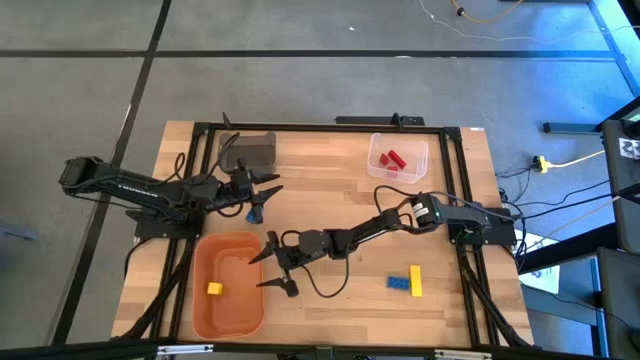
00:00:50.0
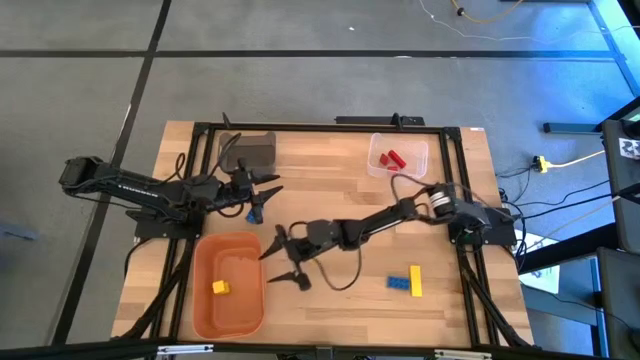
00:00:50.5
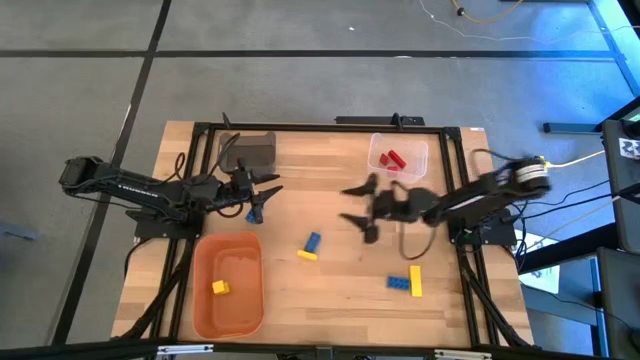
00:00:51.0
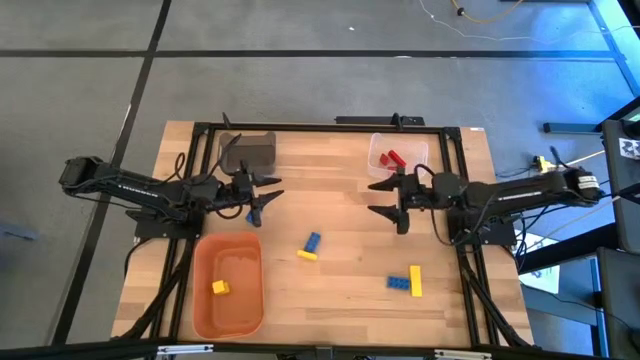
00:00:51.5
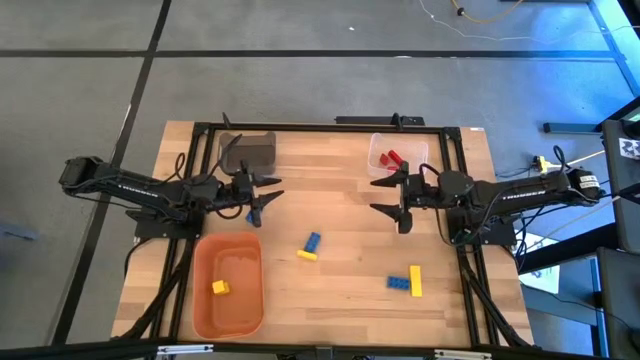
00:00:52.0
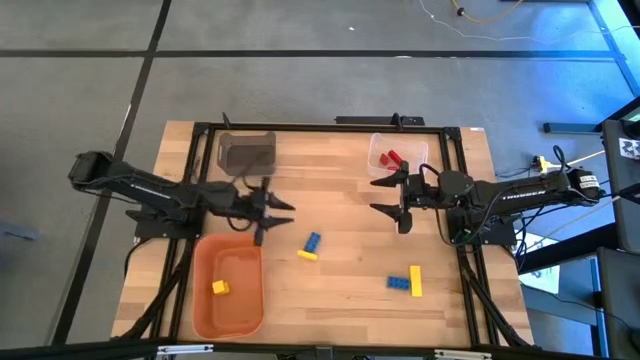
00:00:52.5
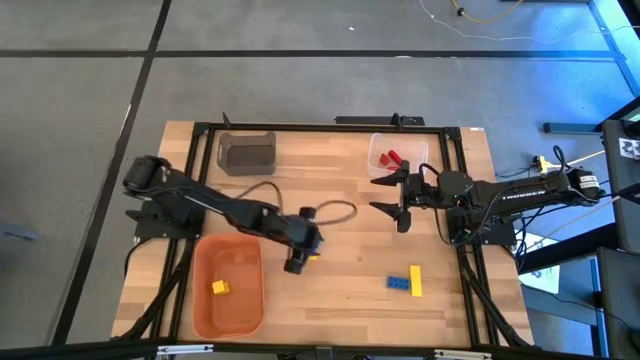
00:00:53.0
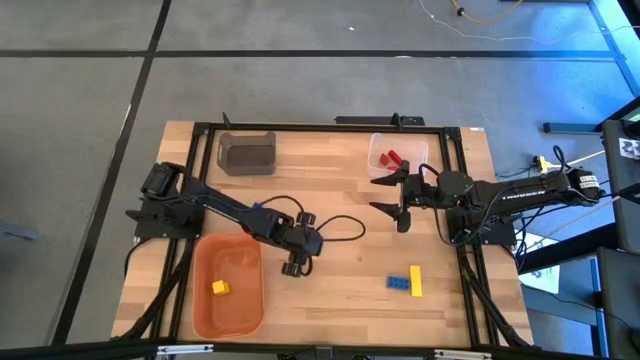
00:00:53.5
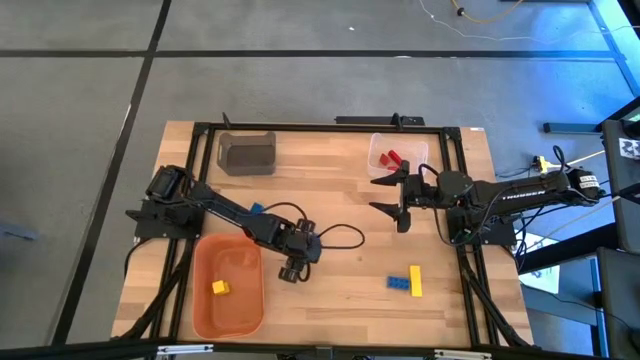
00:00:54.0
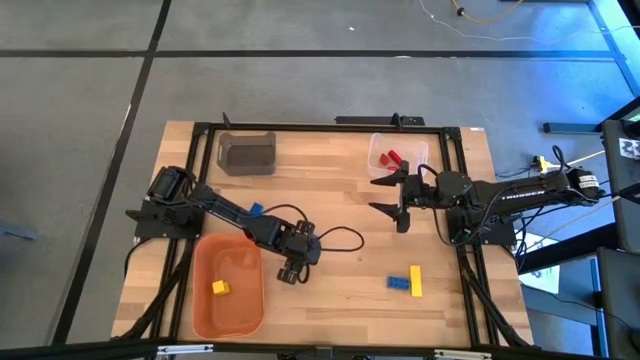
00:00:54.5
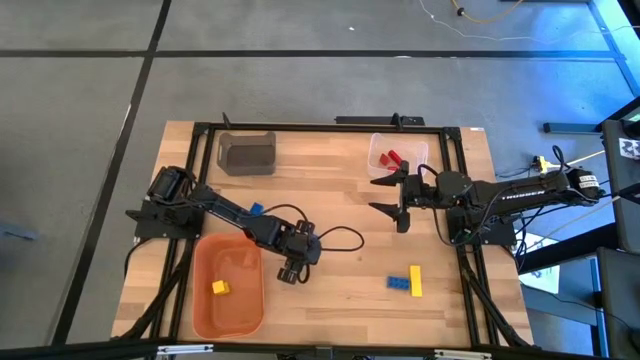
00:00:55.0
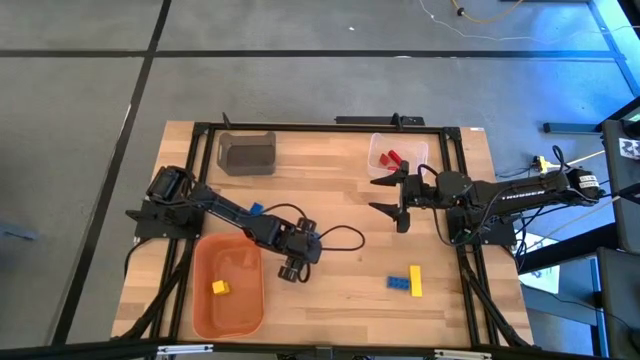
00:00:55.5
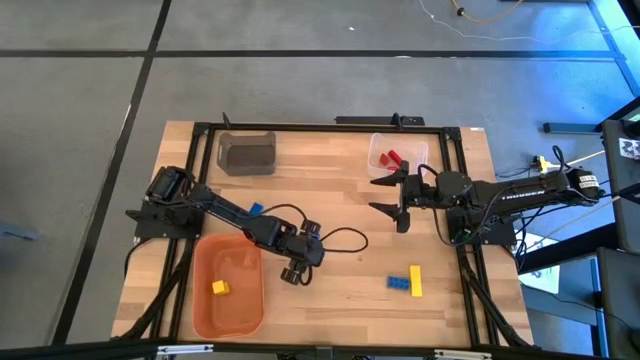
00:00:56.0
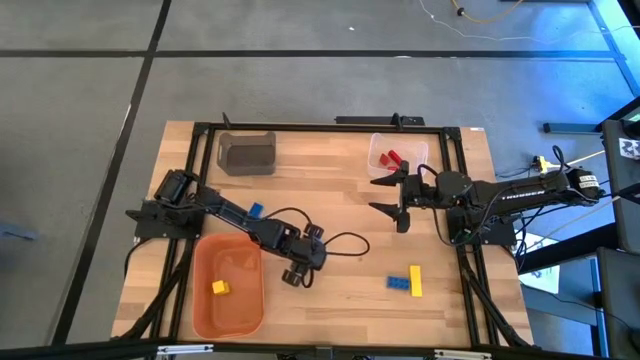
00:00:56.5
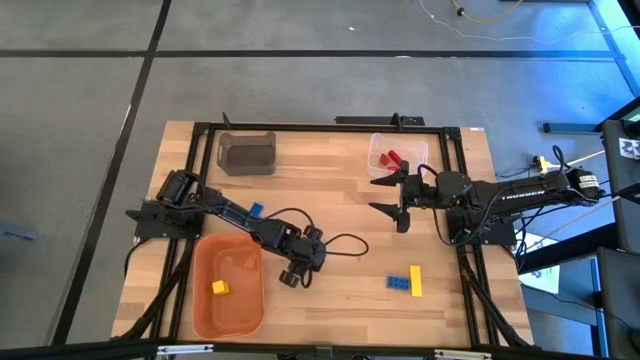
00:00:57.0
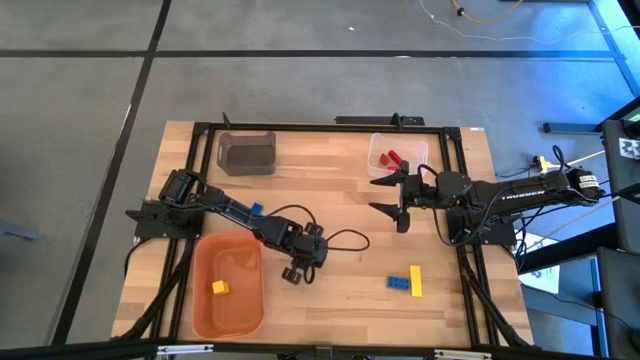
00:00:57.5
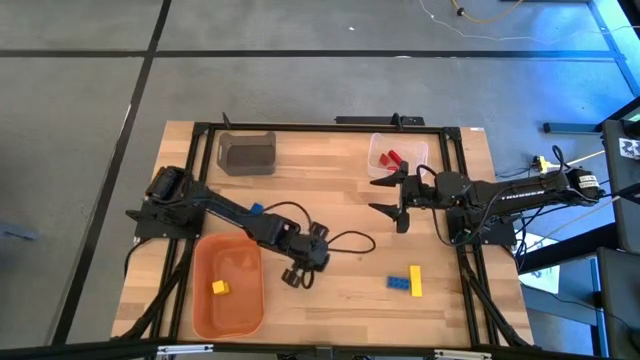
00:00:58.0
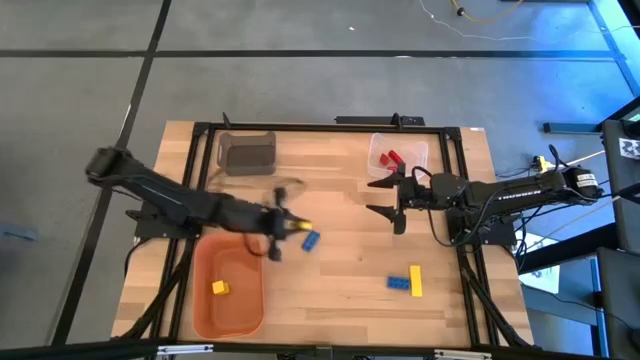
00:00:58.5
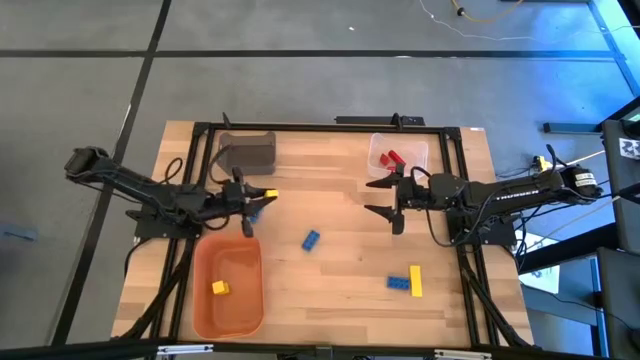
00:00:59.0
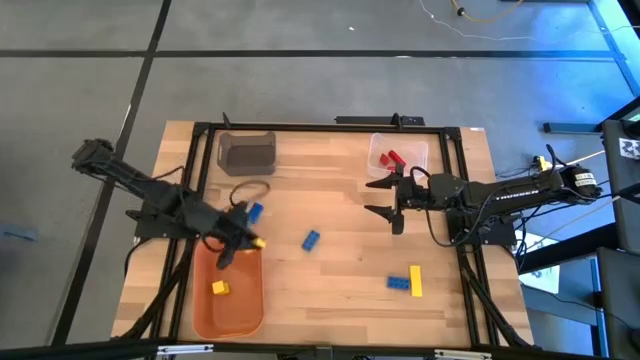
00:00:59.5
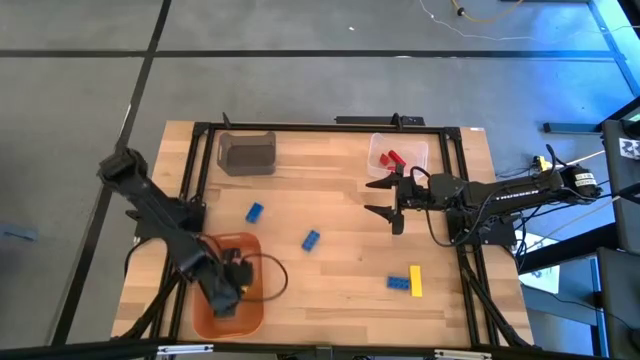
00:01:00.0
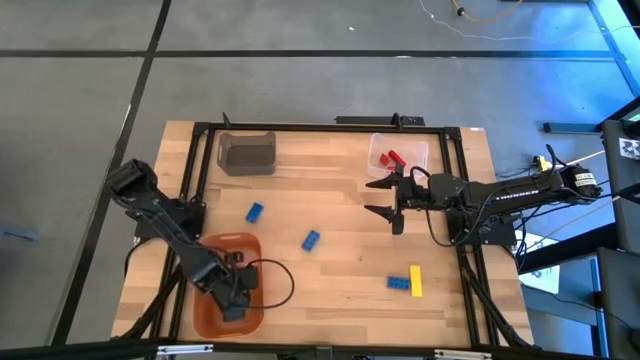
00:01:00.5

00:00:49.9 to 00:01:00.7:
Task: Sort & place blocks by color
Put the left yellow block into the orange bin

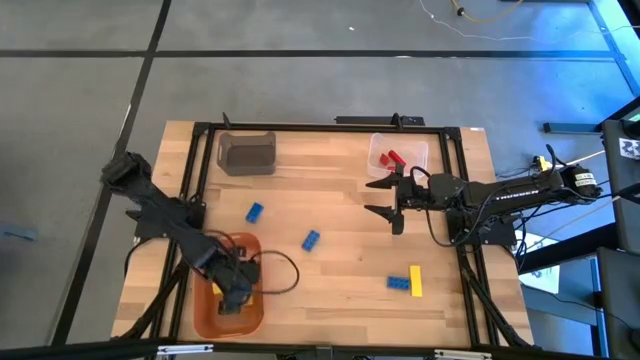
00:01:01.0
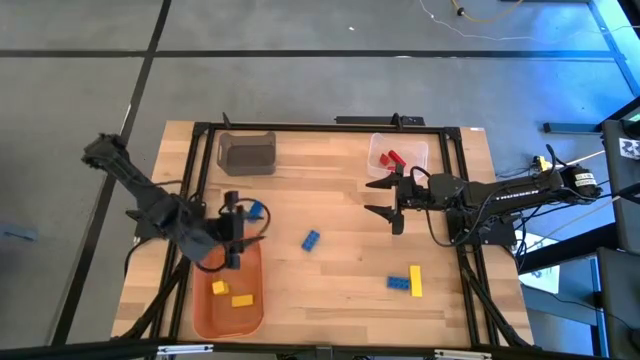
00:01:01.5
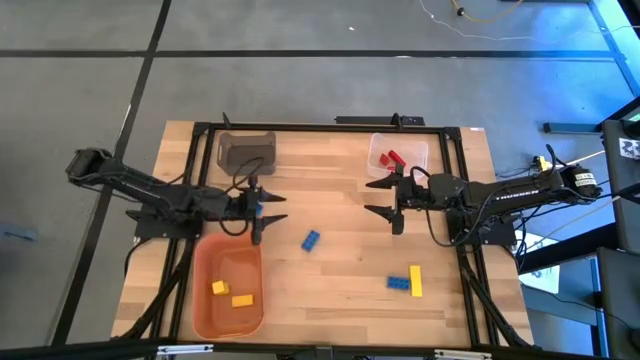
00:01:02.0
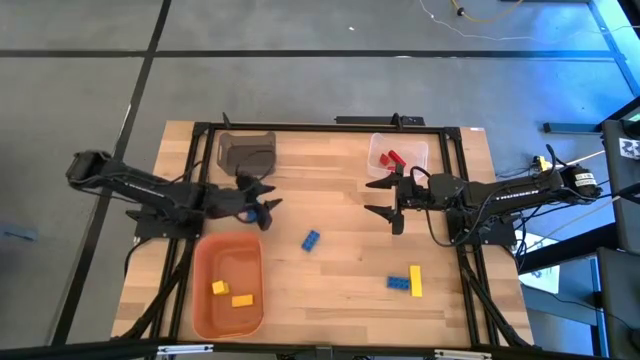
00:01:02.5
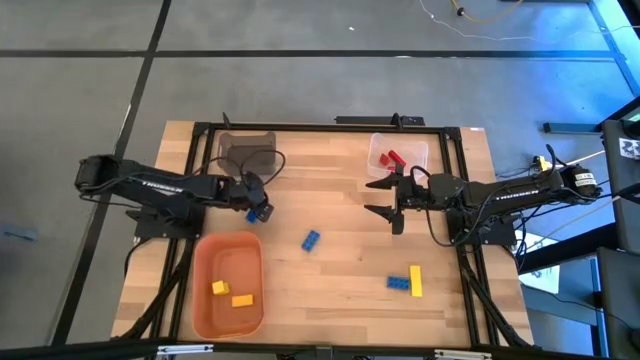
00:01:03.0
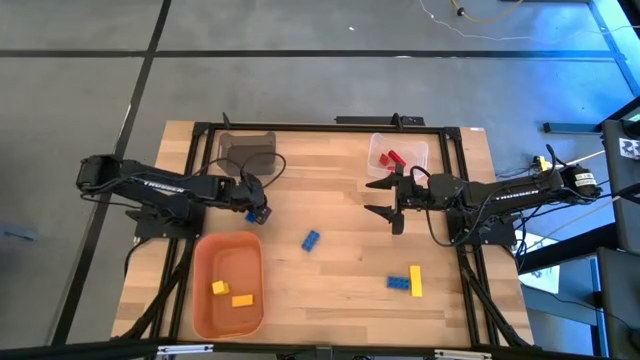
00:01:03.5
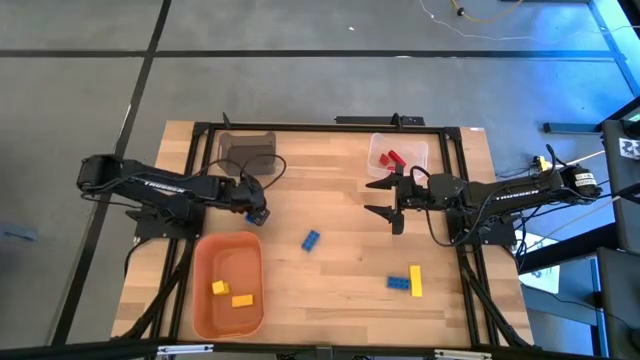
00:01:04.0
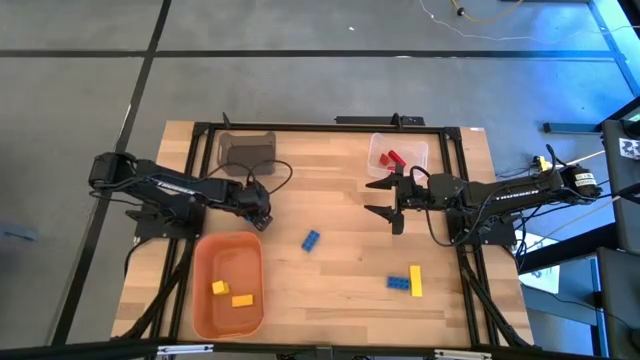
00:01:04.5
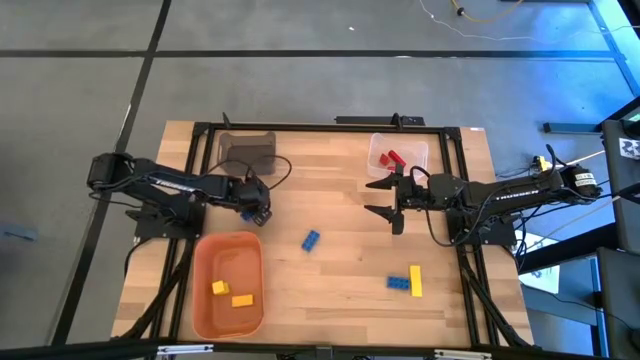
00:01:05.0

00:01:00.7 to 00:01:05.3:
Put the top left blue gamepiece into the black bin

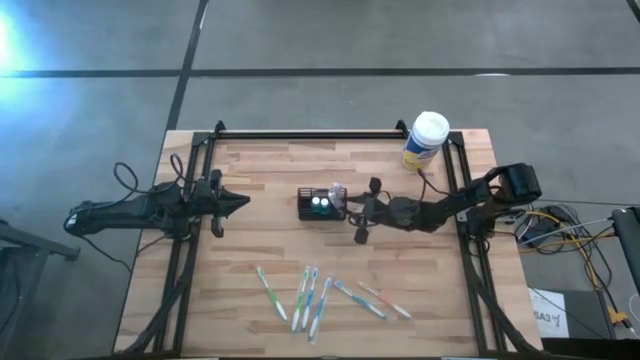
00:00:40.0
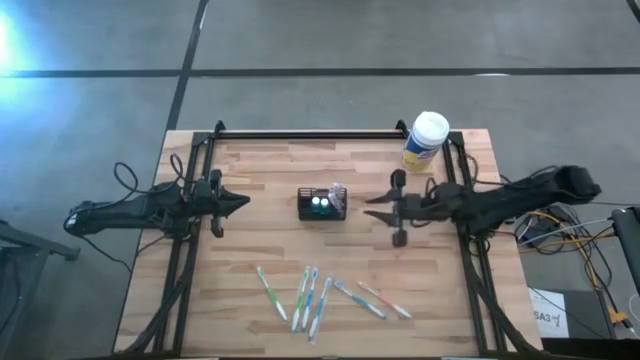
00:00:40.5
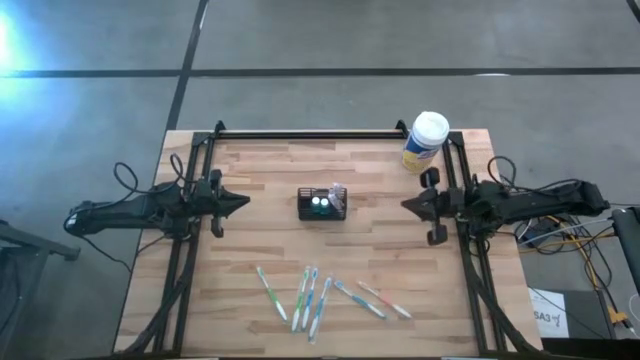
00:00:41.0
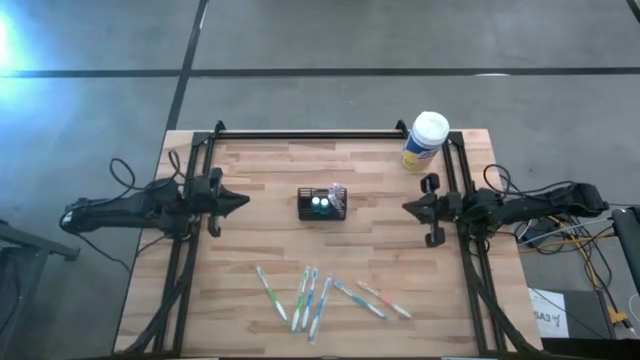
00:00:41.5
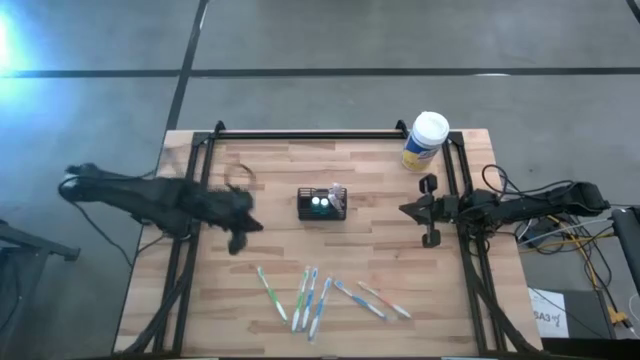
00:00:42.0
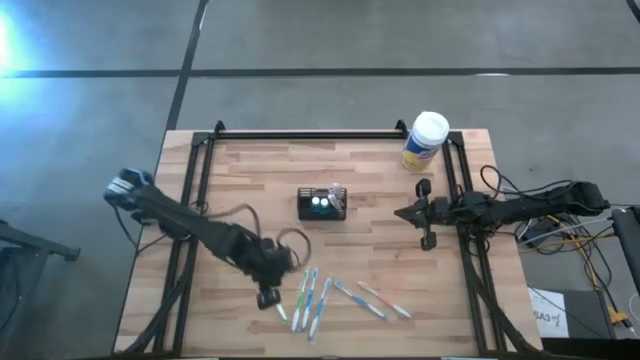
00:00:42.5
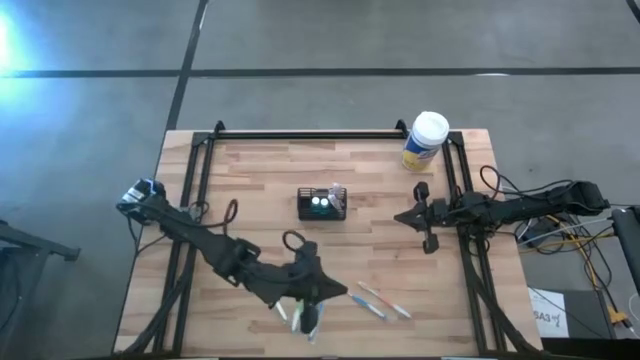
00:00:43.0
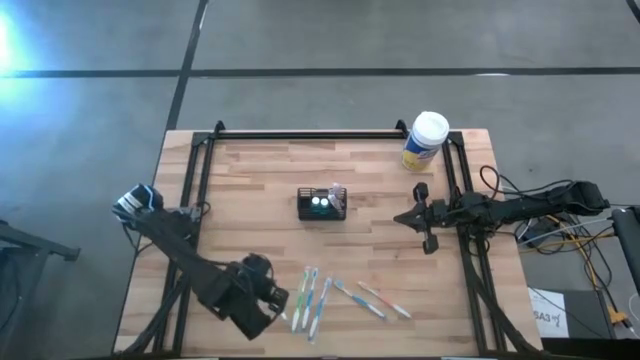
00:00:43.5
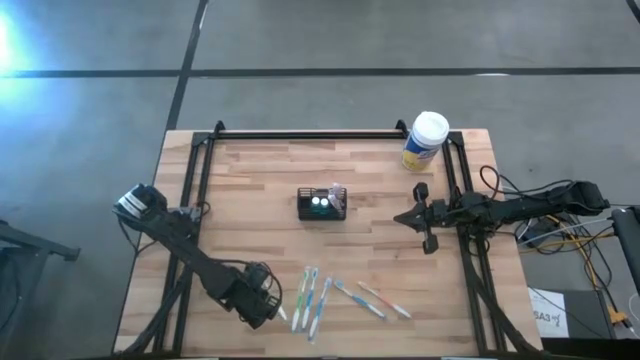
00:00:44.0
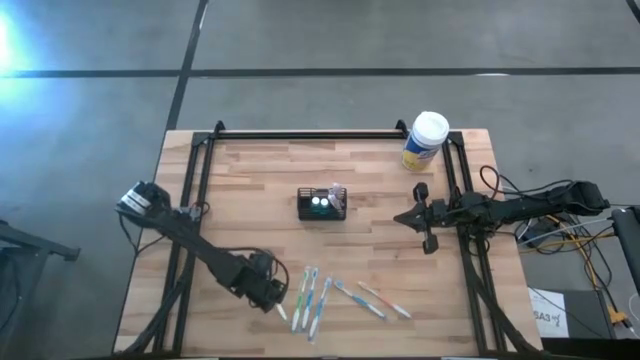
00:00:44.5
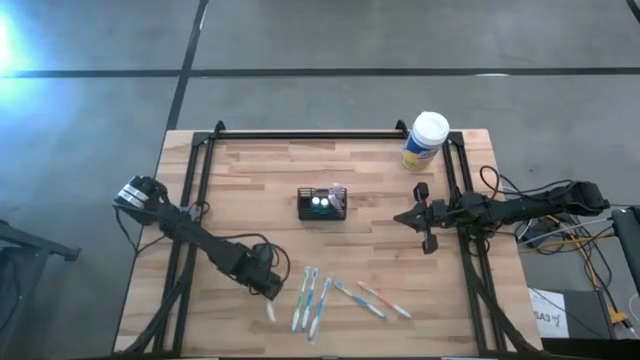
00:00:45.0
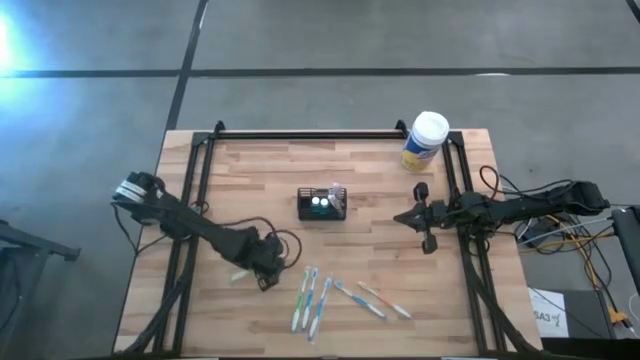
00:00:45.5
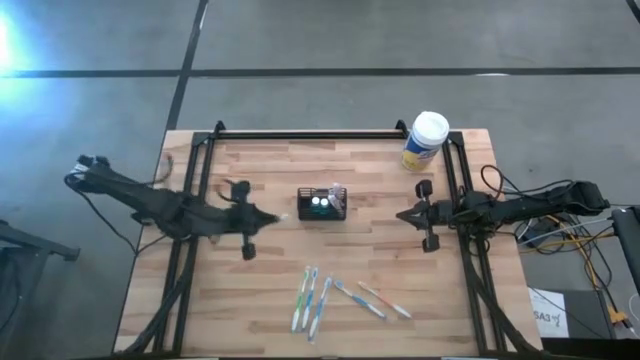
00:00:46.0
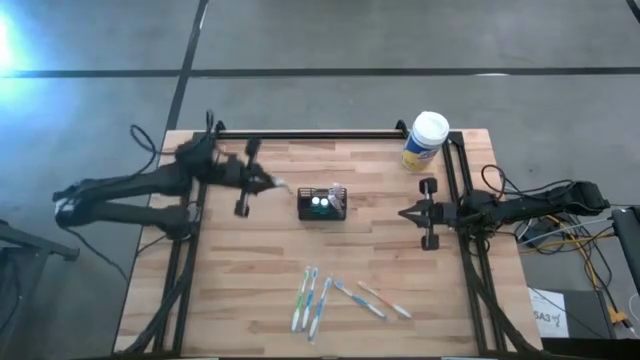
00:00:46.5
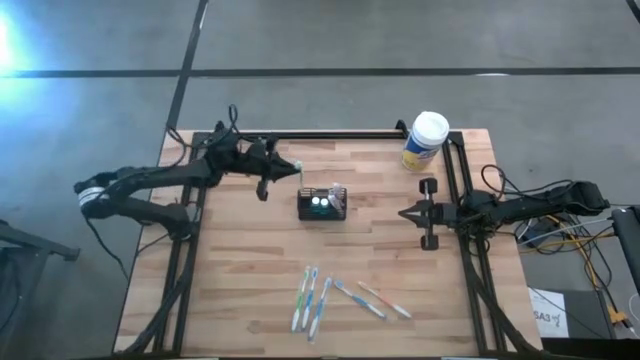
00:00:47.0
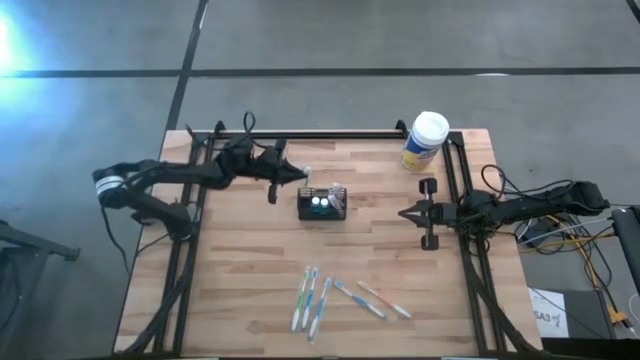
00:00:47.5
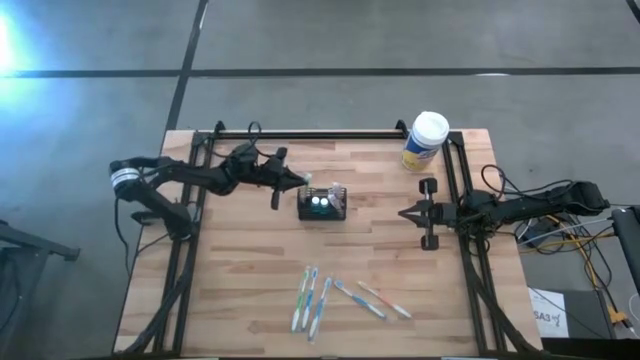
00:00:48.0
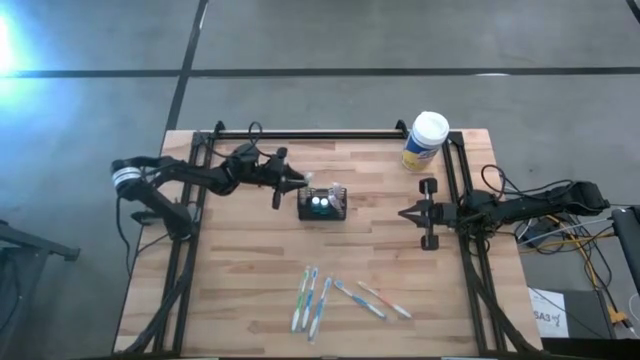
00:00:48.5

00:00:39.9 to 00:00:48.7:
Task: Pick & Place toothbrushing station
Put the left green toothbrush in the wire organizer
